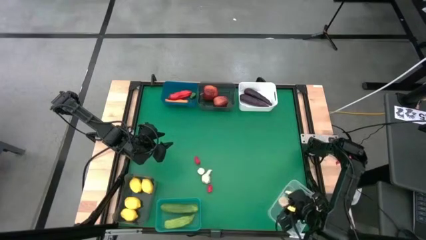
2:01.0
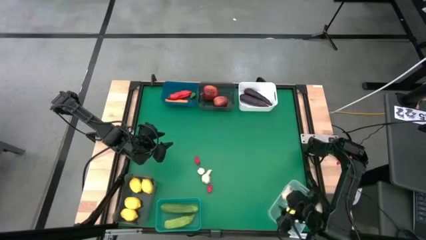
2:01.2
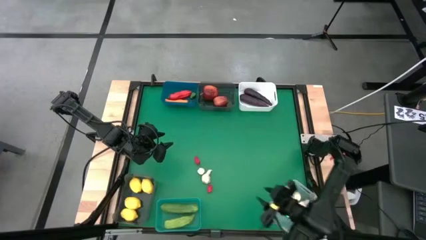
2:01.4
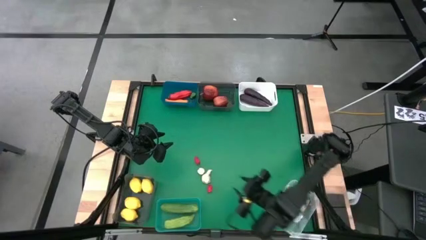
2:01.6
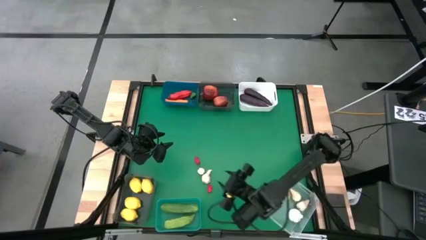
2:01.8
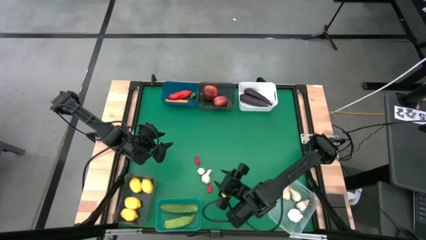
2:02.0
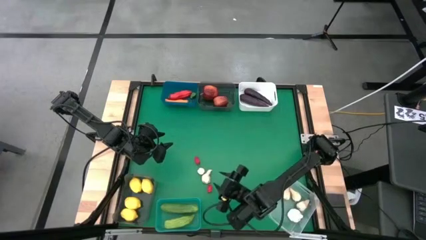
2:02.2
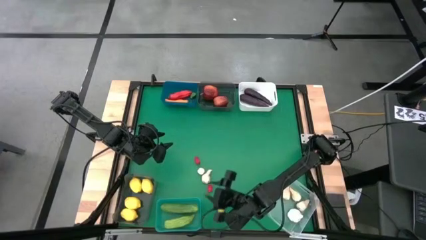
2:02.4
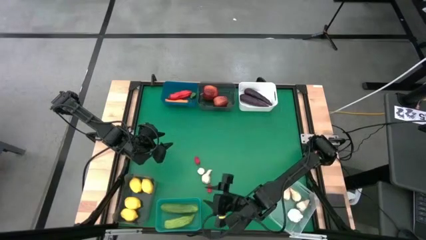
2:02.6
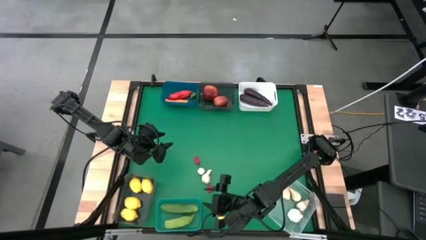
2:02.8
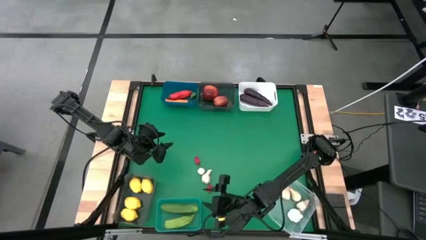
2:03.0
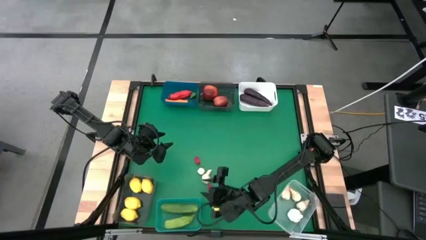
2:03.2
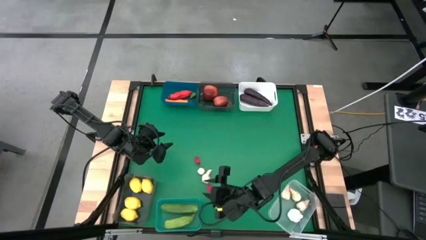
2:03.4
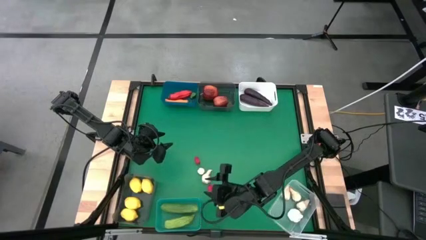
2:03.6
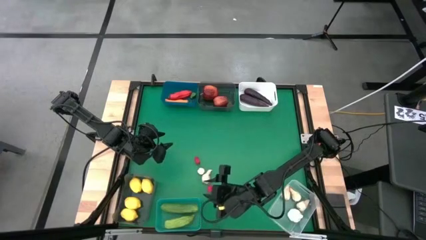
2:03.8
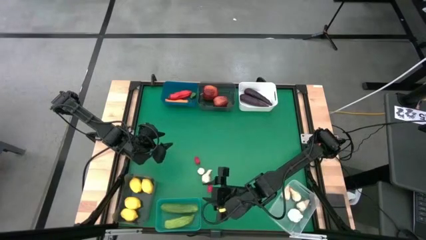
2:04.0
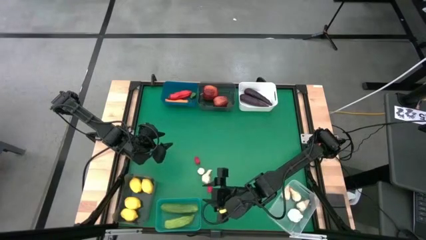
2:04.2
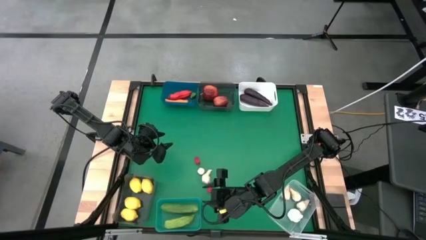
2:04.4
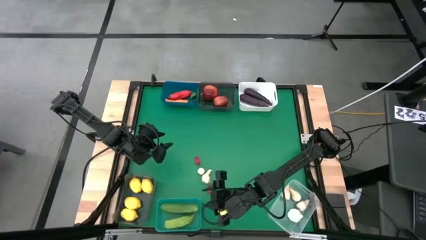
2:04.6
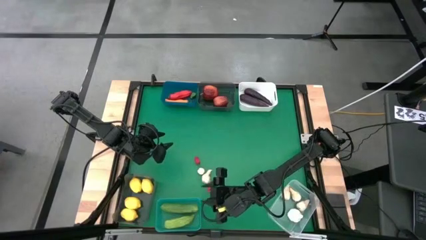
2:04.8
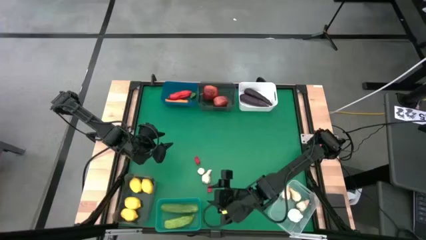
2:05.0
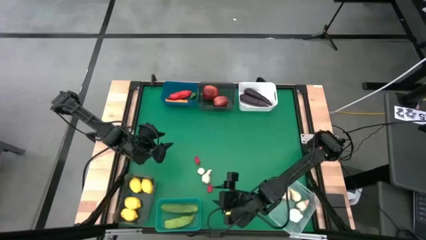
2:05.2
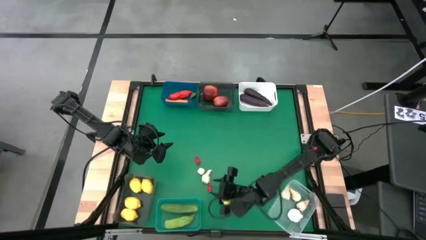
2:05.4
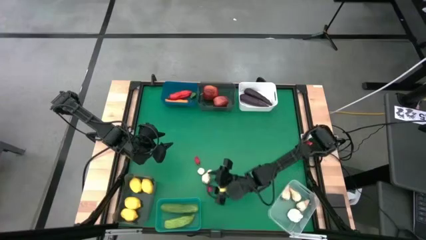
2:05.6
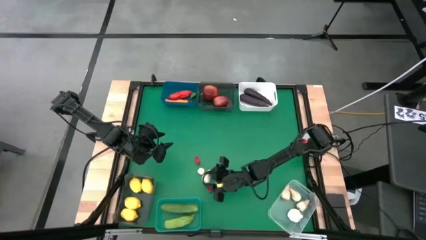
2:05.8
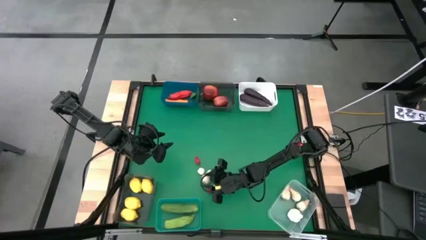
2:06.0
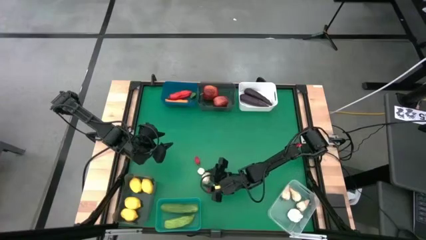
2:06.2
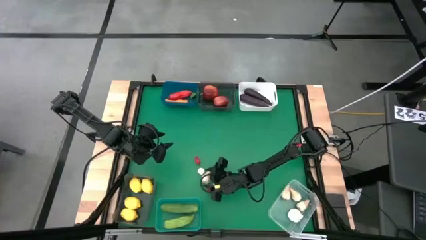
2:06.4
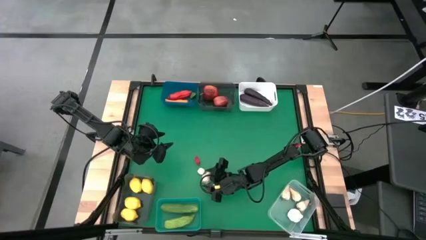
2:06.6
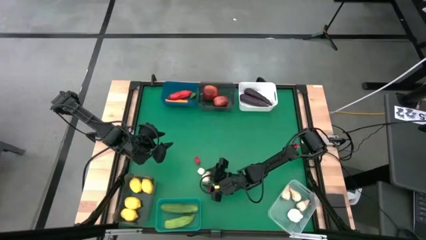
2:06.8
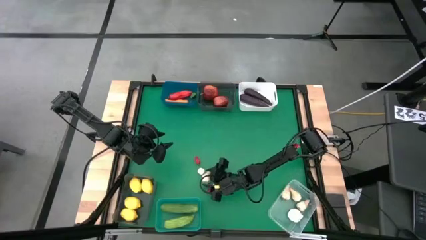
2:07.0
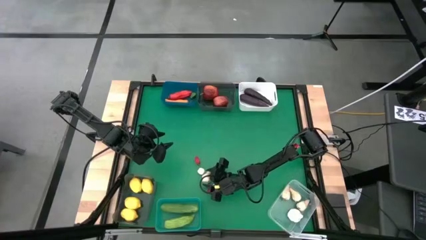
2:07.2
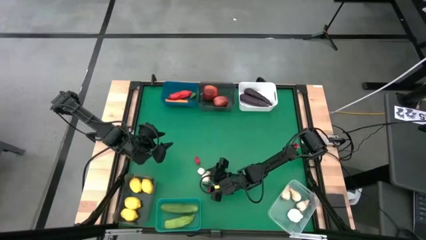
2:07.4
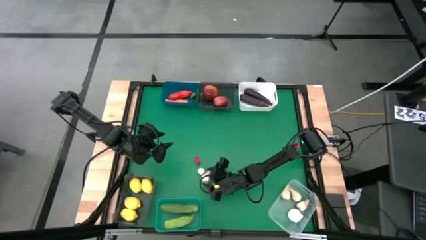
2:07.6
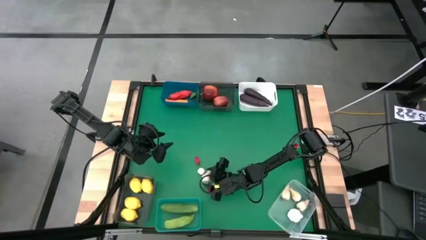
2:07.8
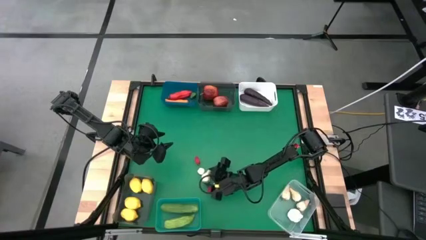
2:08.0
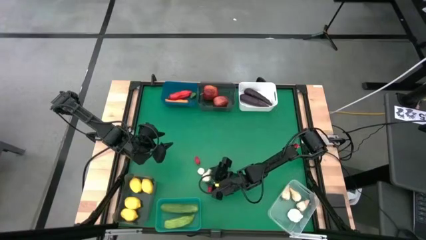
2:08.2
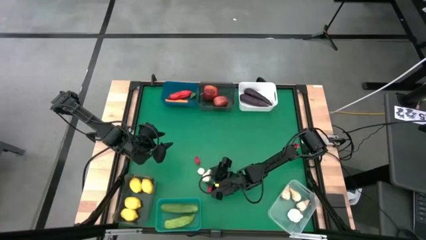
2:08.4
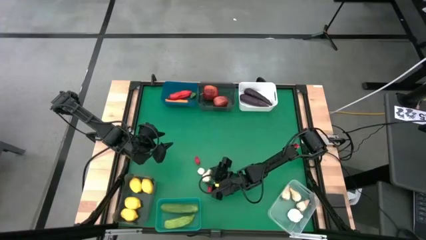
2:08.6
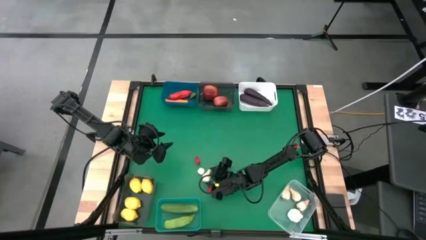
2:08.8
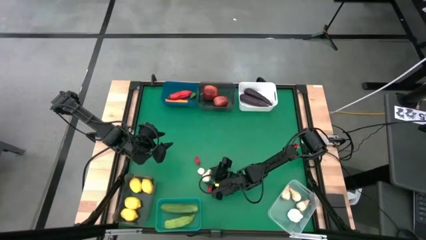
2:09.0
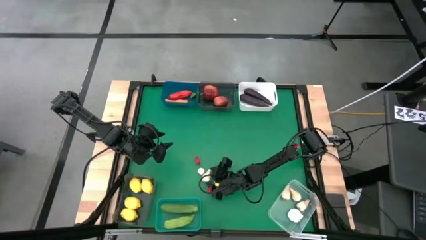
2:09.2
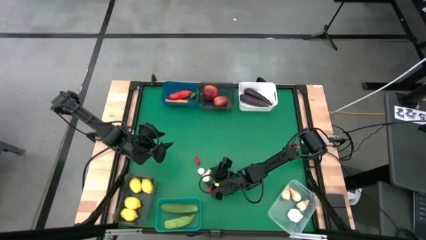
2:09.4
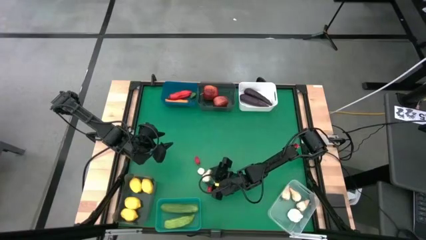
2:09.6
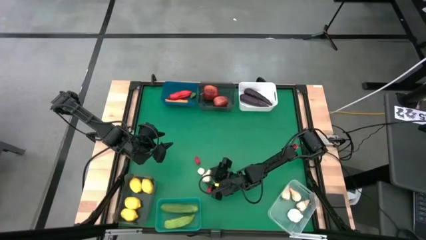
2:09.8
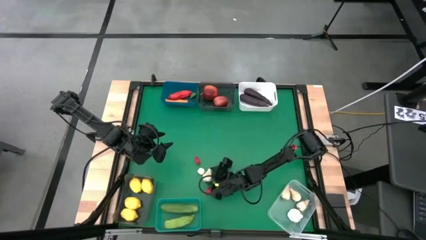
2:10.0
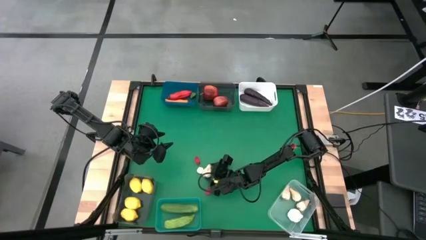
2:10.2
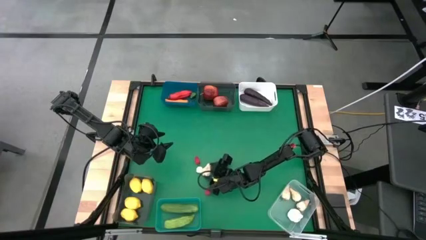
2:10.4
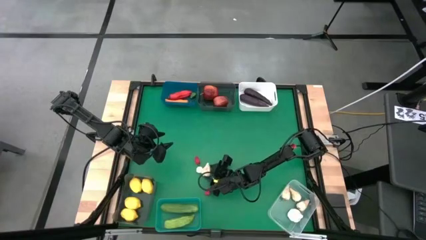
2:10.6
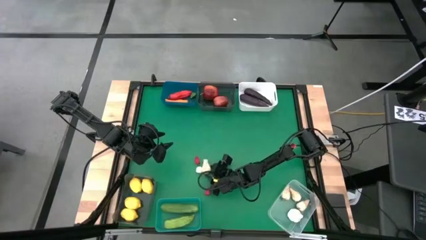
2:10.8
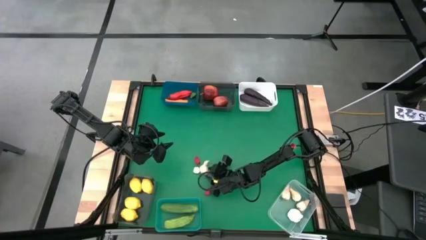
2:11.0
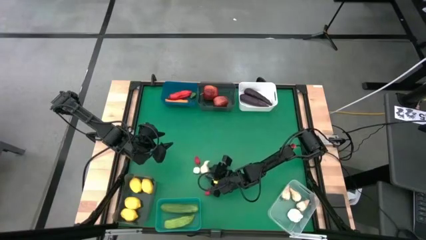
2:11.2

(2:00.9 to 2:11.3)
Task: Sort produce into baskets
Put the white garlic into the transparent bin

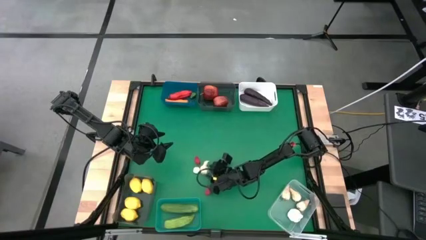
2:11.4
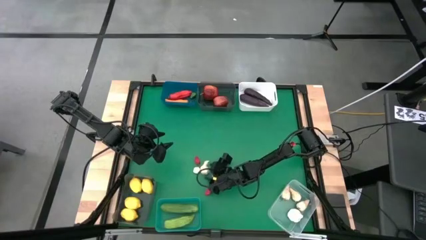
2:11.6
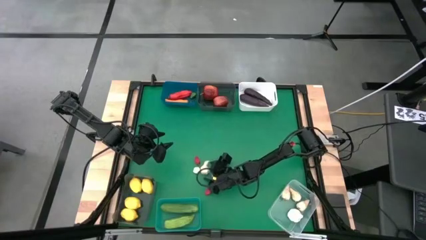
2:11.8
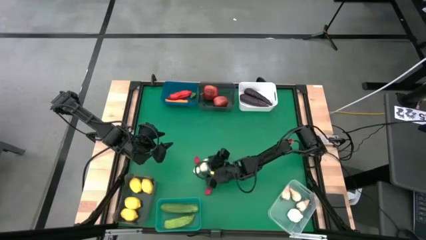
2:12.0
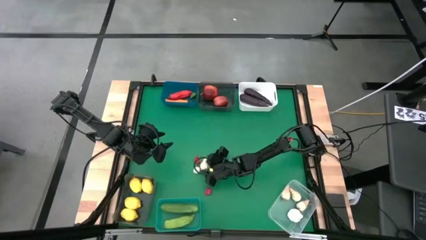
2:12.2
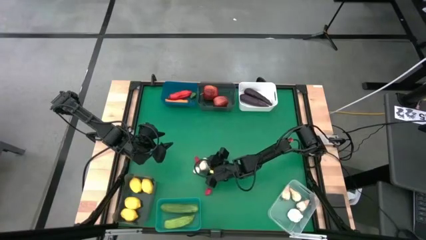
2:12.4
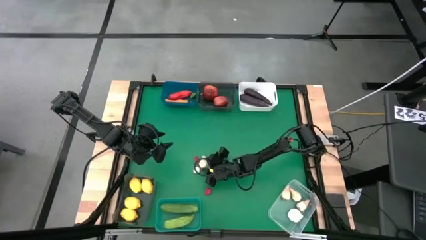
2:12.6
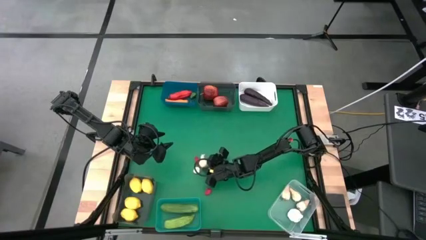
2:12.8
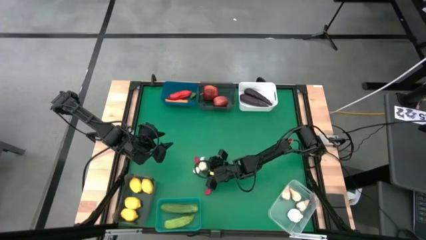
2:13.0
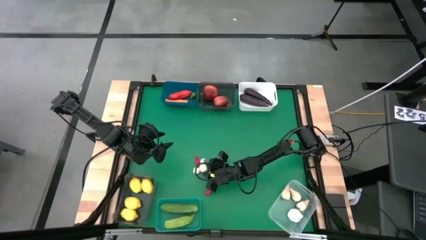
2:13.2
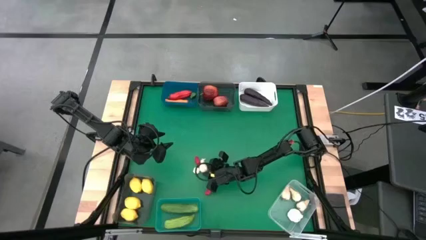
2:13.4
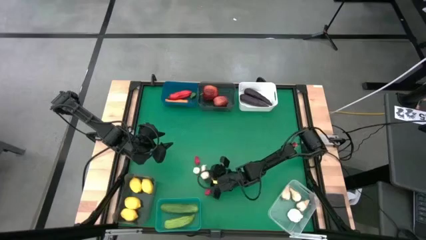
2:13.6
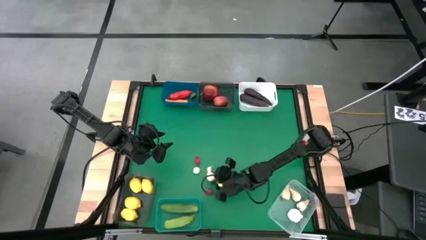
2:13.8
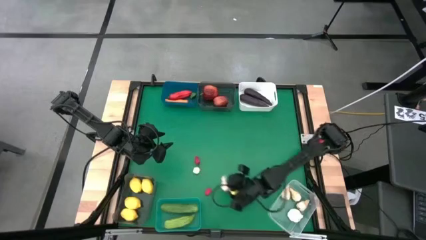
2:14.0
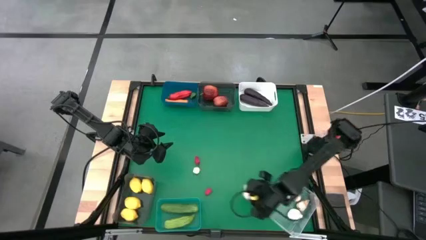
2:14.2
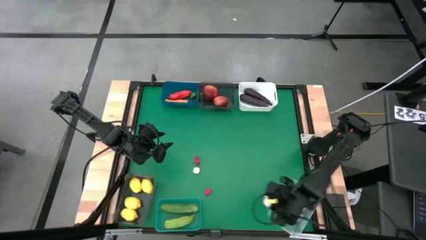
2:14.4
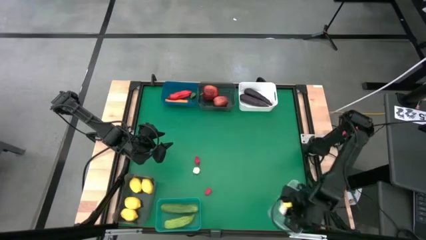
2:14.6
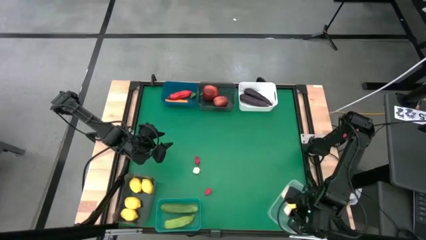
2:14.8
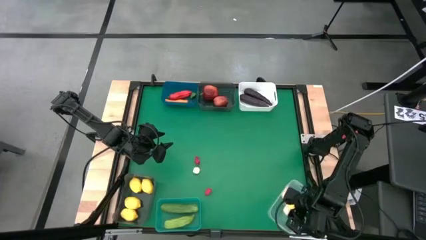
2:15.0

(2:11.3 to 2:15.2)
Put the white garlic into the transparent bin

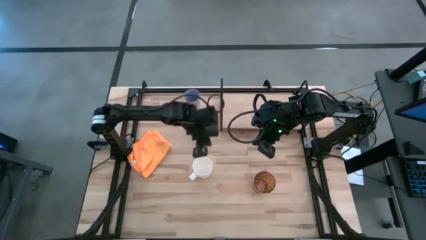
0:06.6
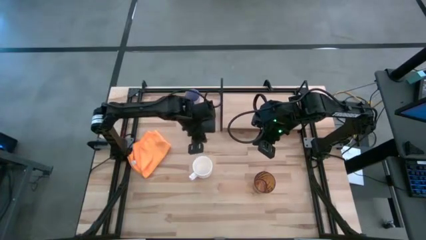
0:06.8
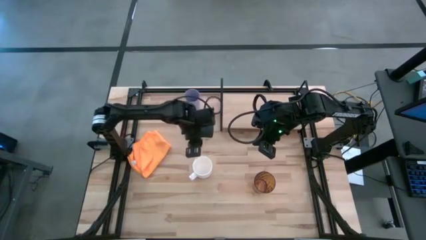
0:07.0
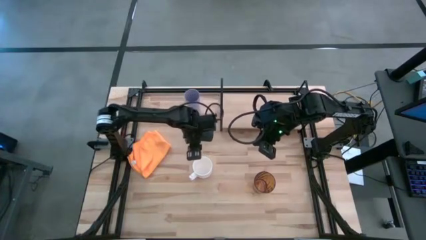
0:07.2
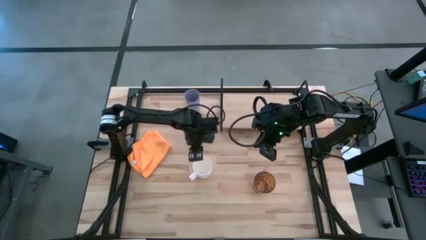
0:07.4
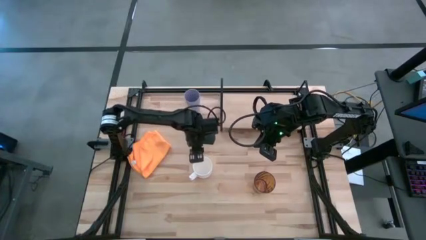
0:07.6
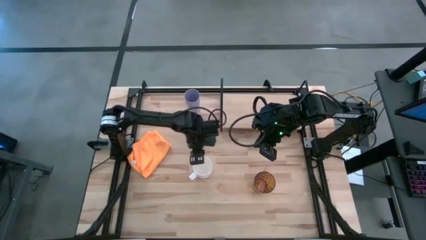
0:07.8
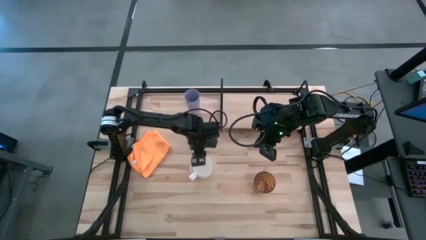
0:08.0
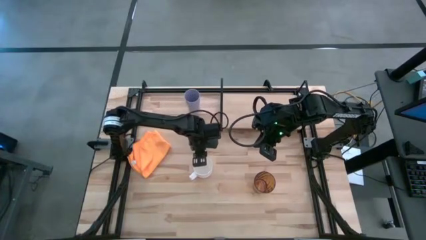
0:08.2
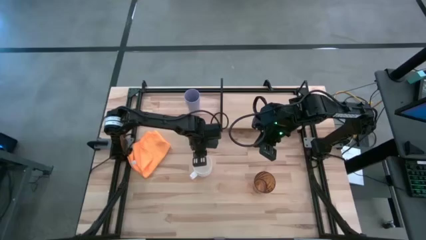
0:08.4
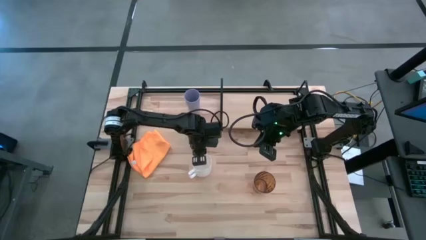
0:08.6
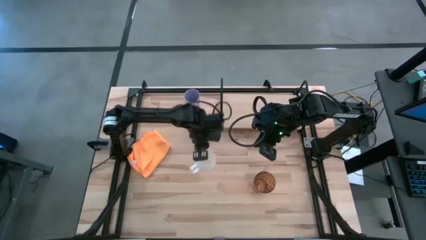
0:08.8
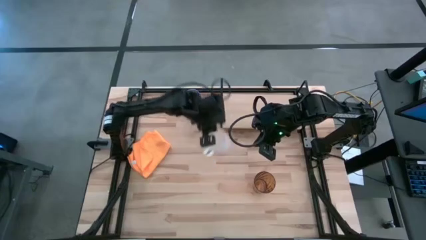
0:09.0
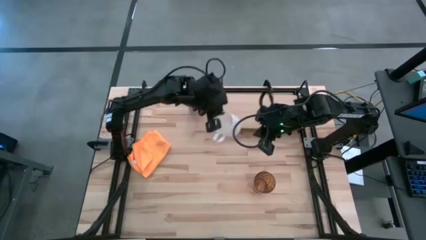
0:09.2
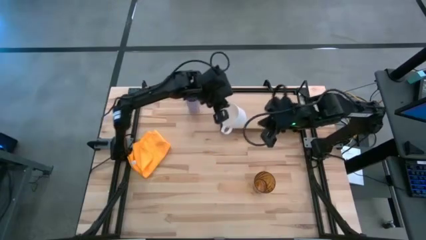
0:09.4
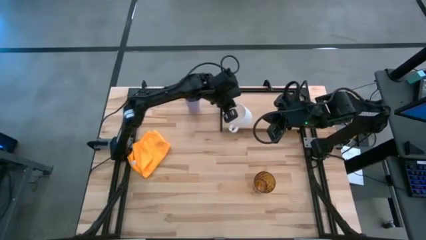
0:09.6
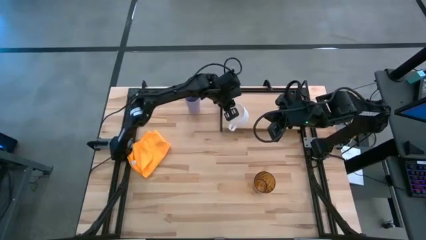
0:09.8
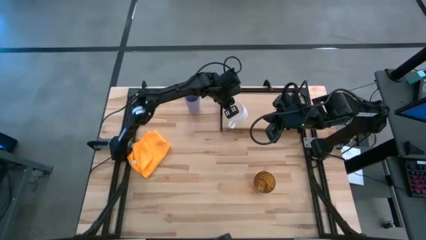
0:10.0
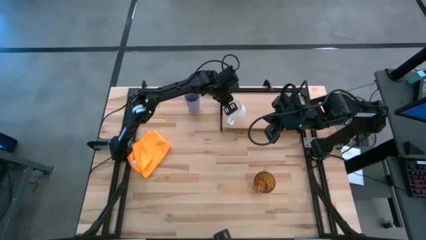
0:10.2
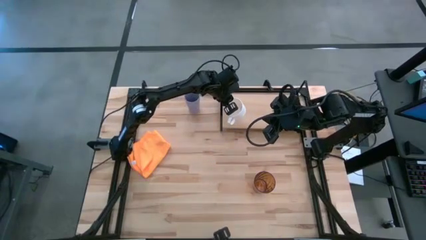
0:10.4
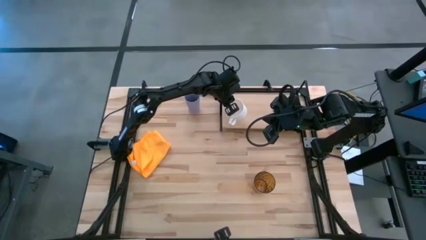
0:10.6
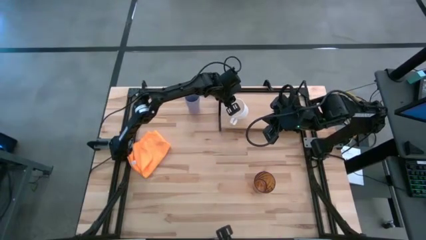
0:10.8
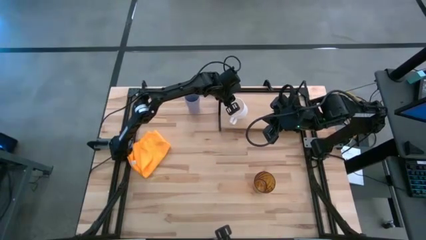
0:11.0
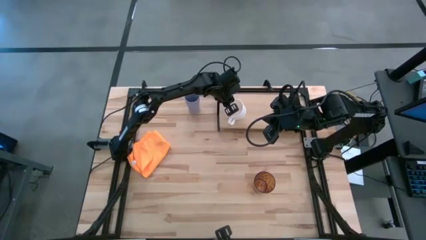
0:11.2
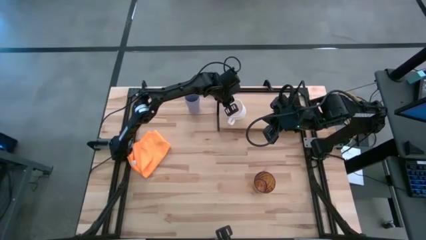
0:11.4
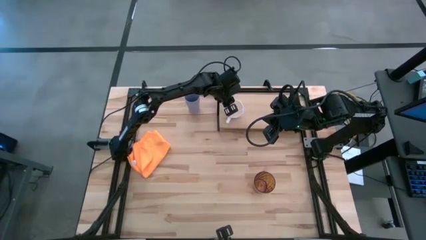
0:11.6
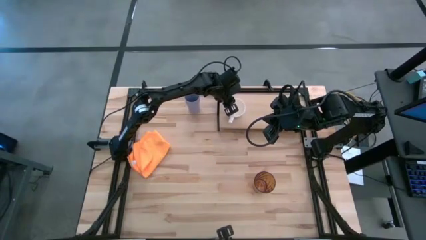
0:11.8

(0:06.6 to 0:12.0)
Task: Stack small to large cups/mugs on shelf
Put the white mug on the shelf
